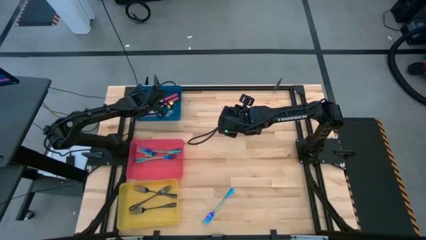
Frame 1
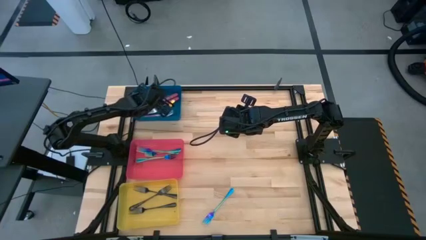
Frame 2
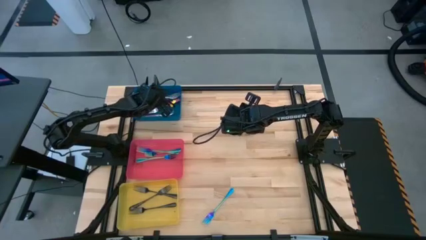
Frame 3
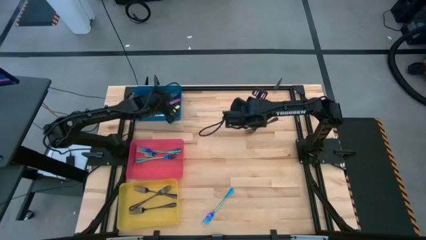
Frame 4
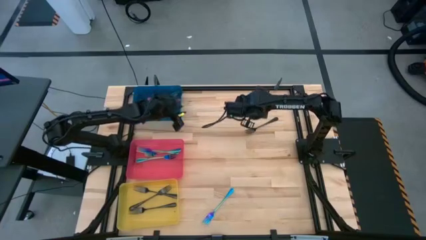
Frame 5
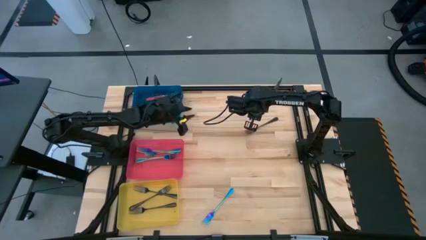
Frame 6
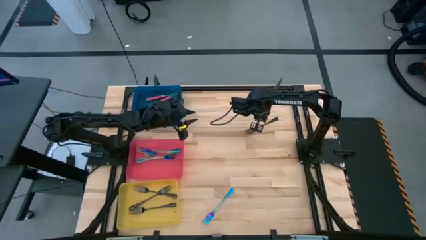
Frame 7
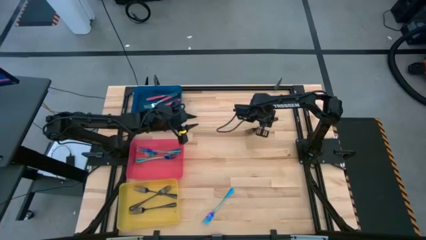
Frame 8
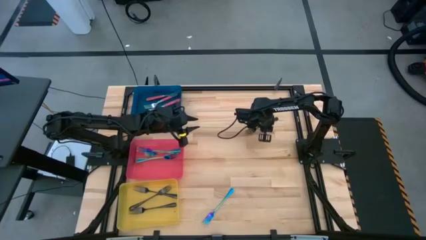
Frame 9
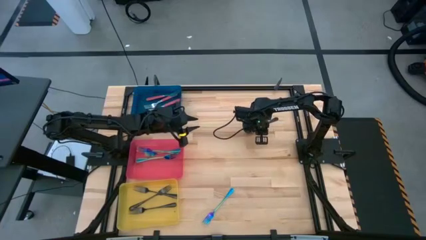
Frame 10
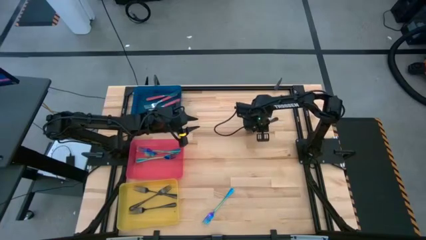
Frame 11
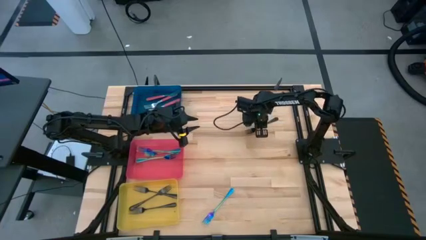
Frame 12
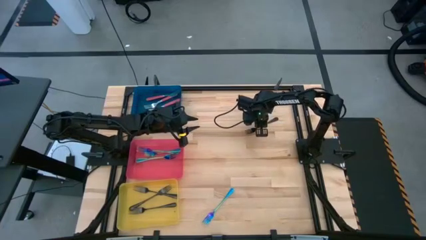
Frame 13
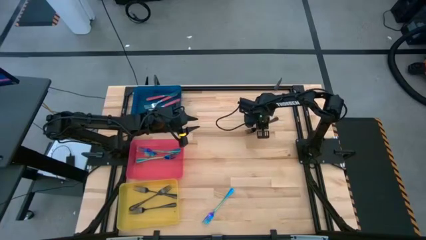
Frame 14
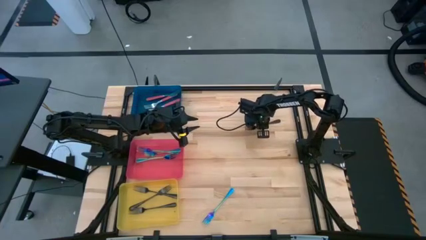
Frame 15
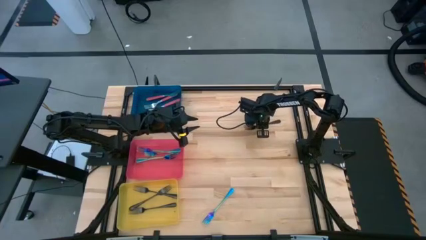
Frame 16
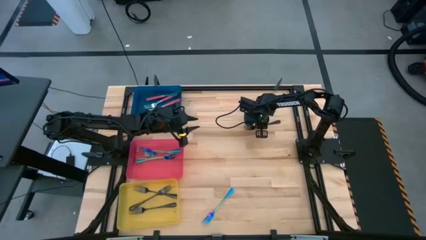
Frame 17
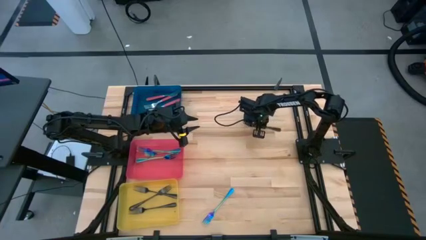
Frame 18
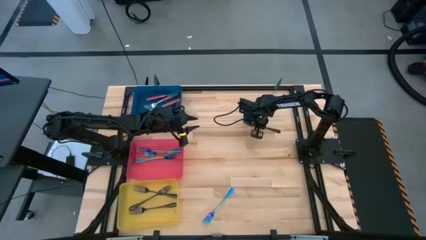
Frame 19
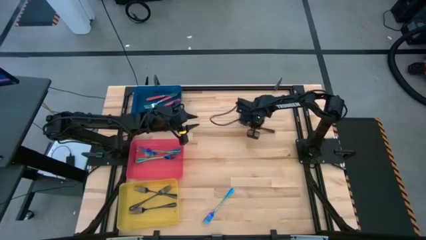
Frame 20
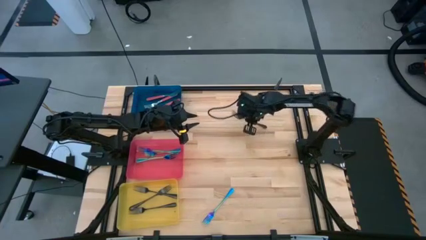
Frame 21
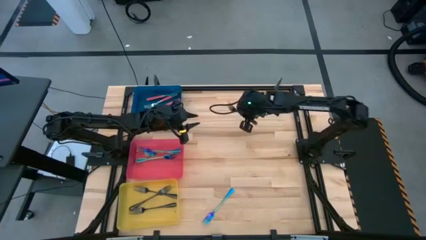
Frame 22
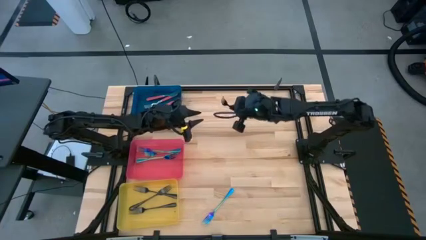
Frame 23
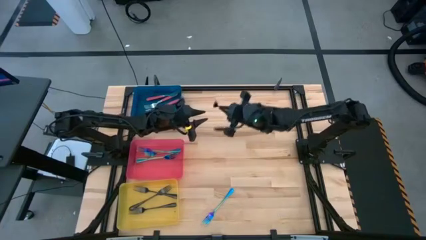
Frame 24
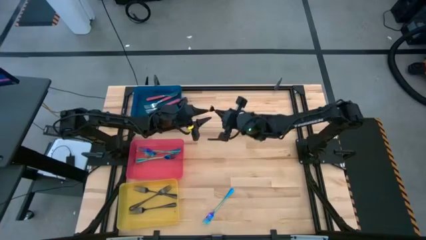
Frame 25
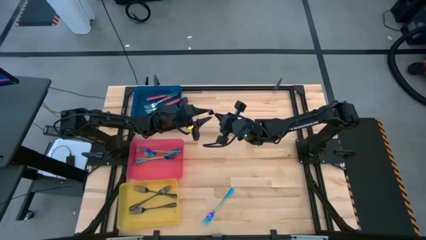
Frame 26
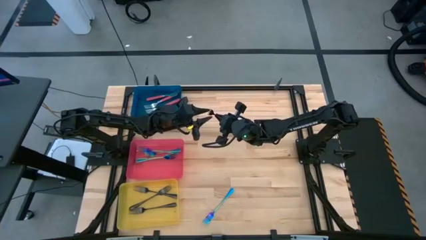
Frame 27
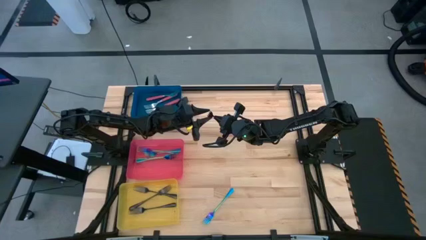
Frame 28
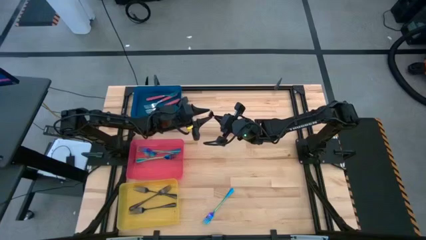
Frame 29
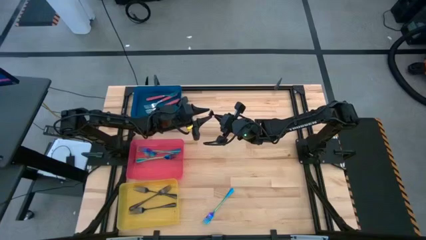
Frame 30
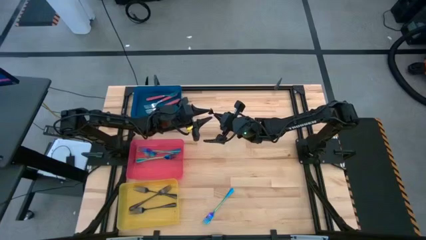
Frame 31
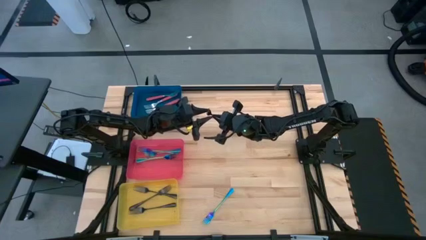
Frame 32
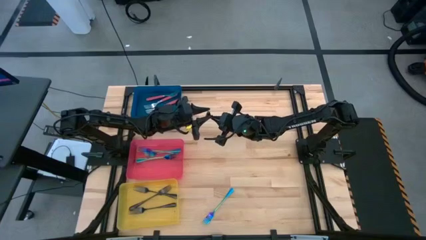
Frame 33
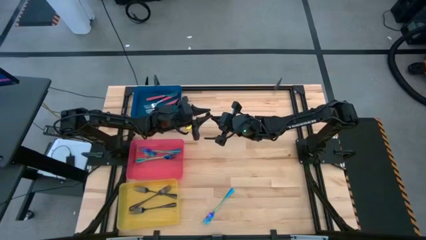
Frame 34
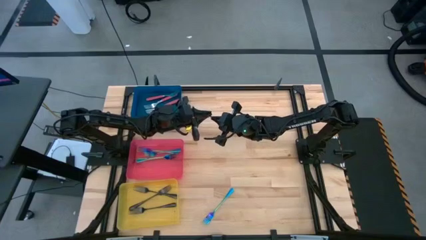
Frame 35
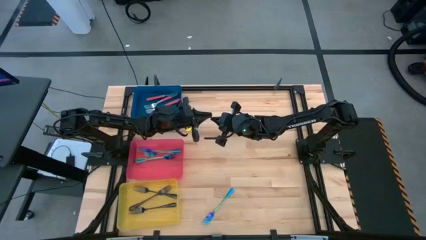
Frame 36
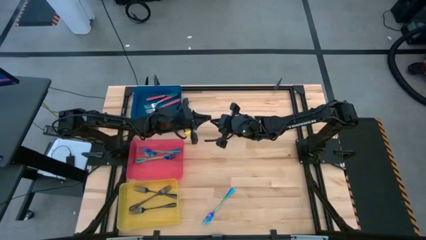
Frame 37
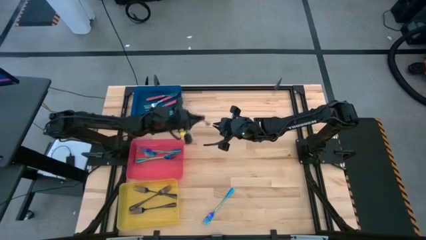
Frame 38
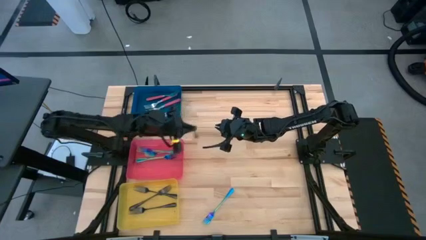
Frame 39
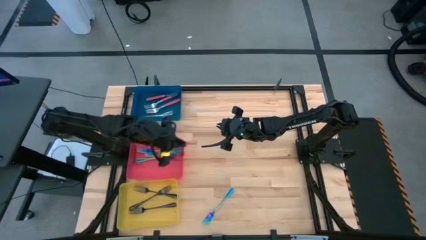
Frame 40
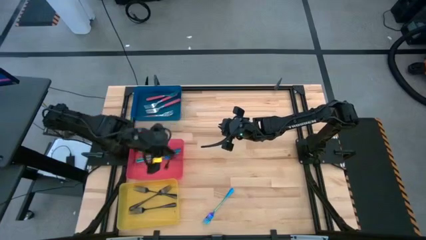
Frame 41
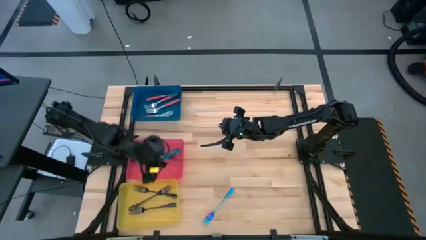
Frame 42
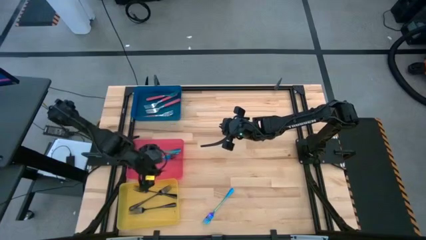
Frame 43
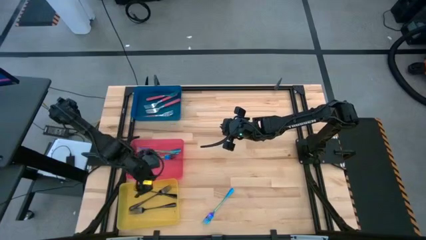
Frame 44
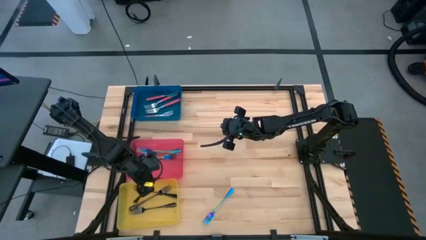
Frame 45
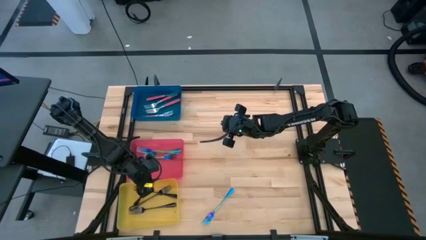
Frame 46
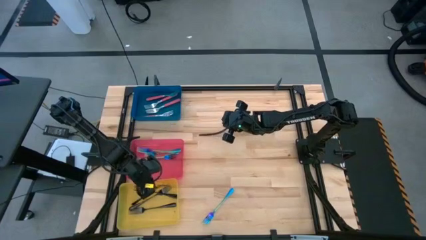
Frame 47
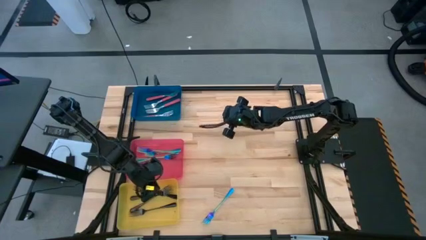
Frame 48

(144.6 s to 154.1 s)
Task: Sort silverware by color (type)
Put the black fork into the yellow bin

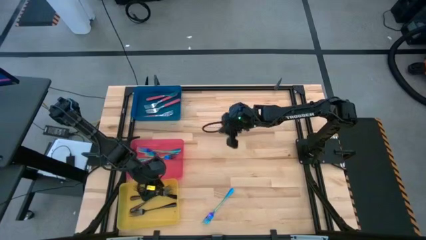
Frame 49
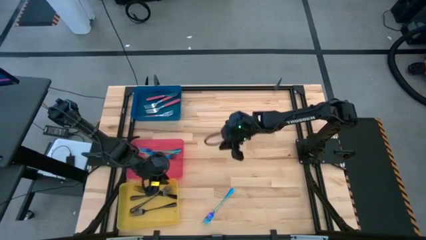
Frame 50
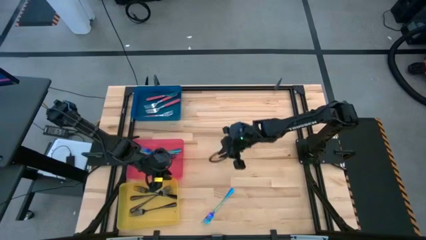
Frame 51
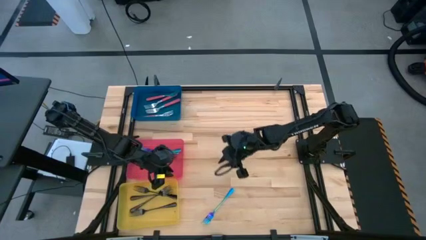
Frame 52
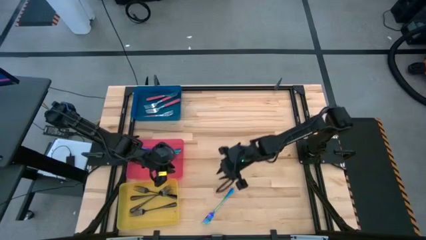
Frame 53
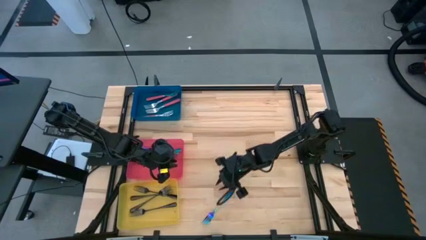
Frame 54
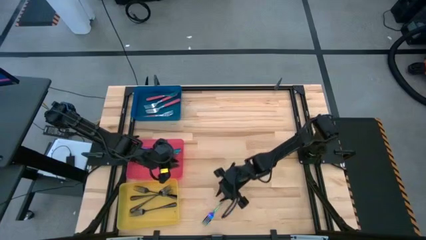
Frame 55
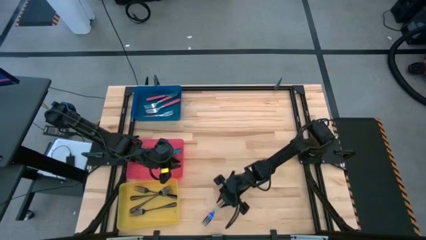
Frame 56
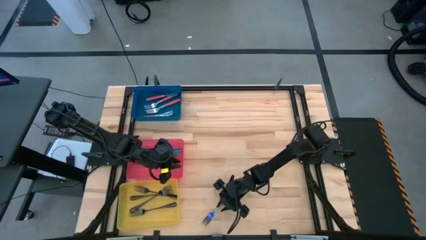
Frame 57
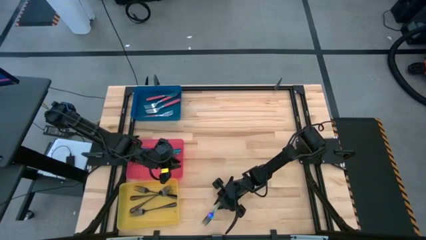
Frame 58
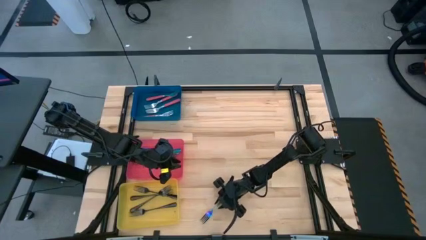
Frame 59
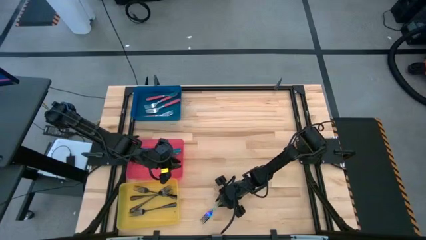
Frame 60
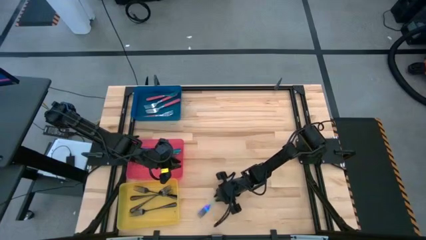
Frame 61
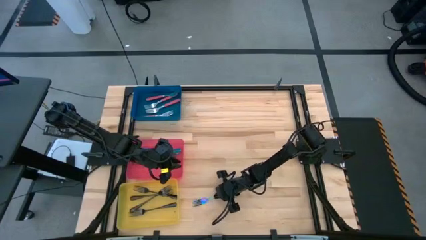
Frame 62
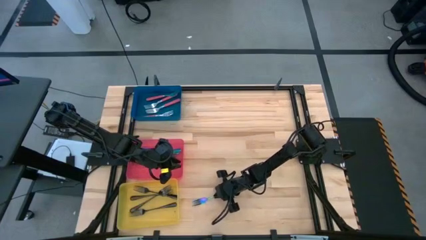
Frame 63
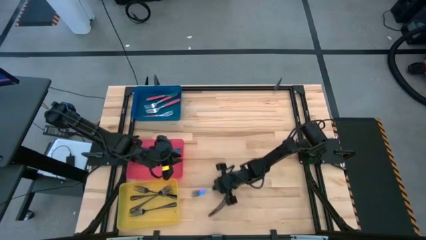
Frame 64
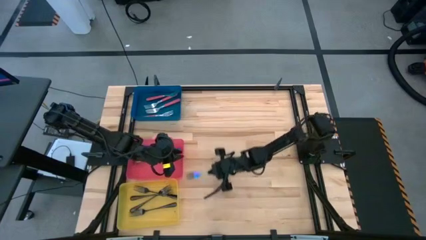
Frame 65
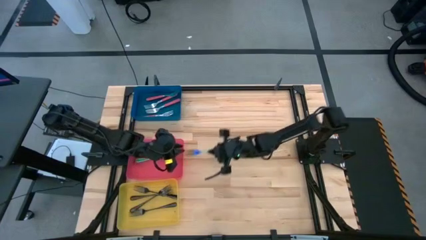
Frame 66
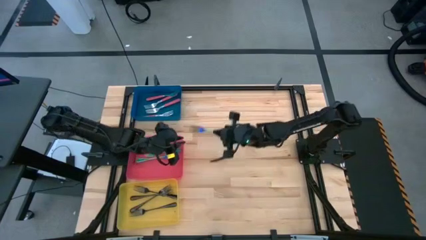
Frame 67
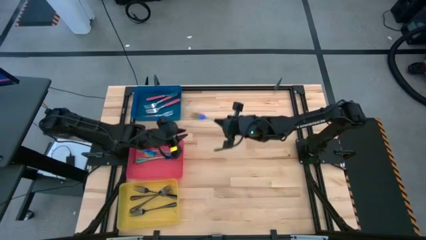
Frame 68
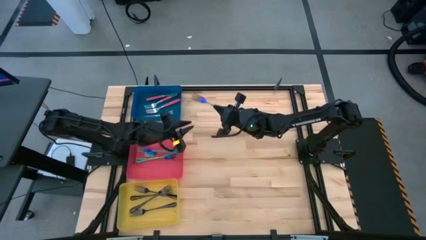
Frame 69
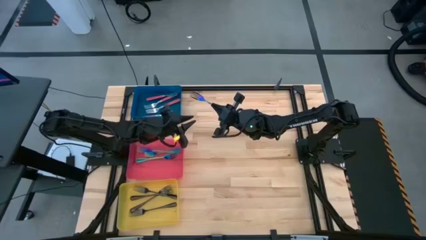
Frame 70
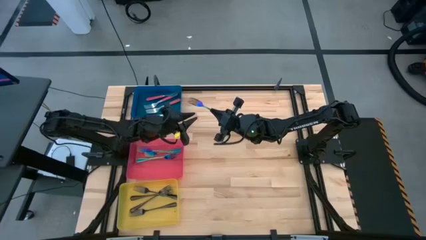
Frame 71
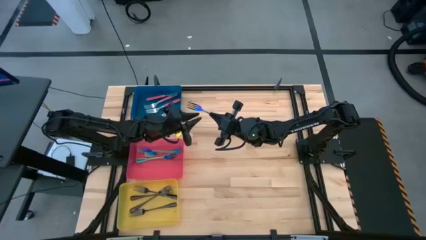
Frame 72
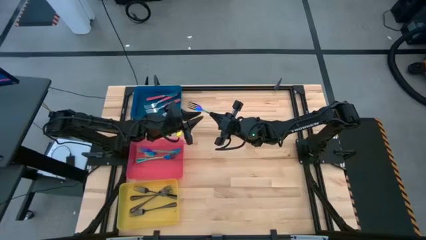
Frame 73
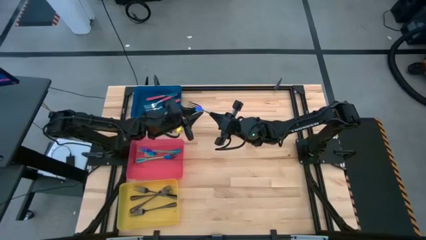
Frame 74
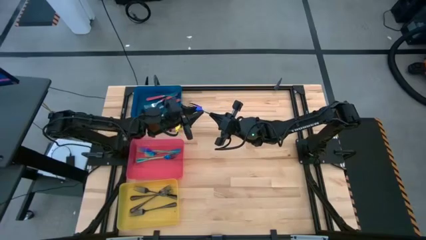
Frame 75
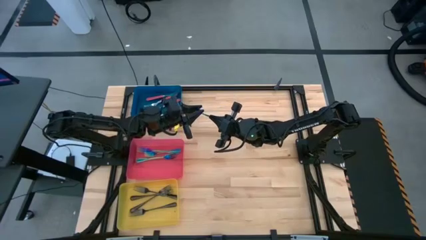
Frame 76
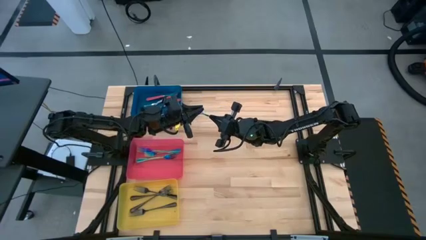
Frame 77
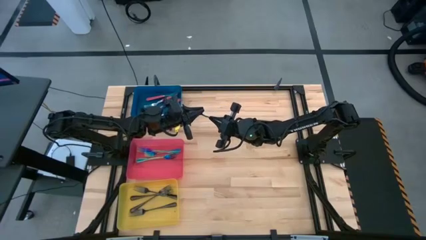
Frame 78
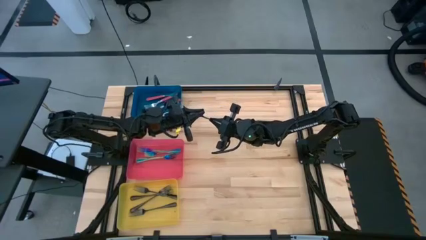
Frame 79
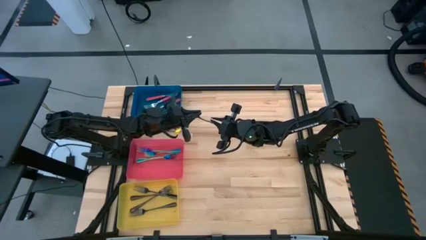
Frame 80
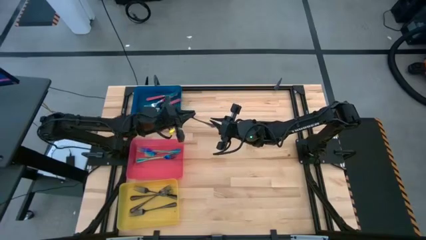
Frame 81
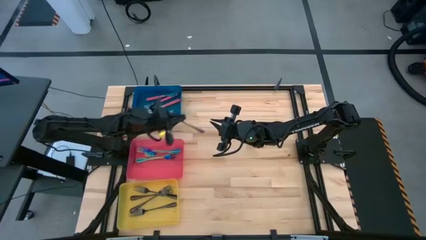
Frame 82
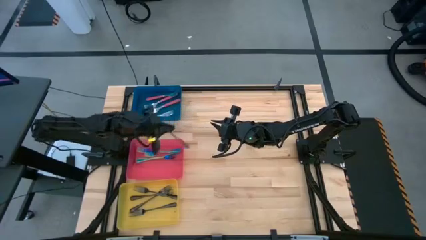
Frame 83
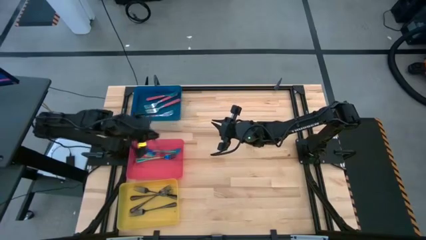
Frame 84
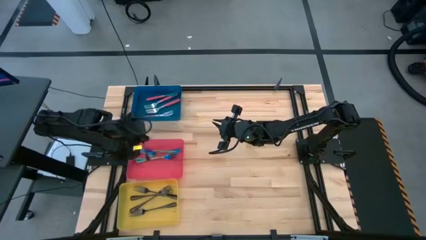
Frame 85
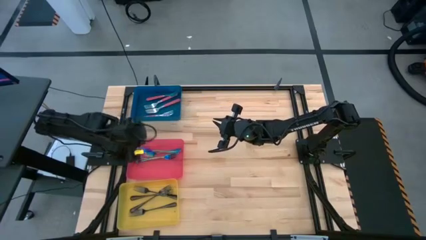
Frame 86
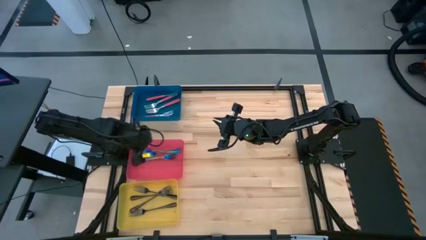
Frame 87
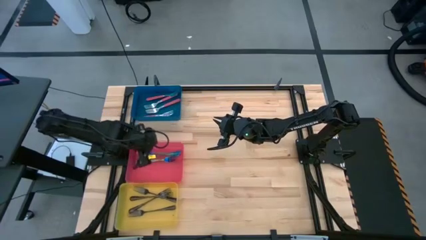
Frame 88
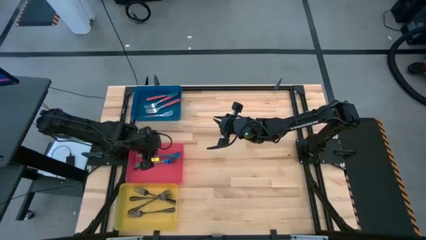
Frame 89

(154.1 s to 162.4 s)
Put the blue fork into the pink bin
